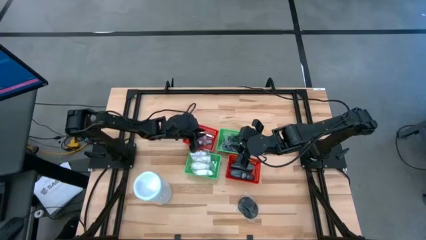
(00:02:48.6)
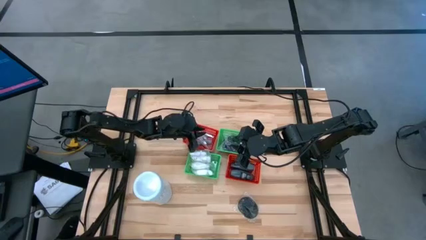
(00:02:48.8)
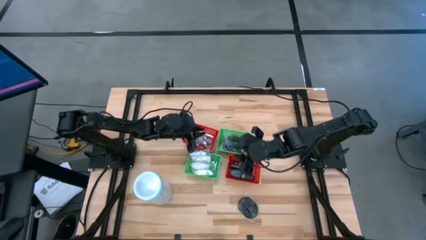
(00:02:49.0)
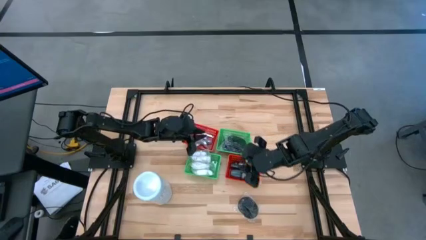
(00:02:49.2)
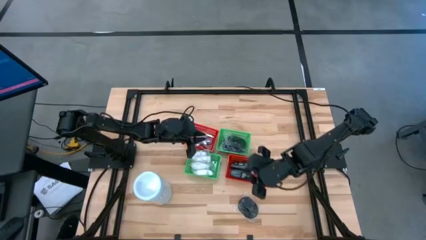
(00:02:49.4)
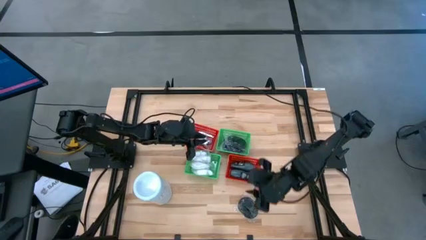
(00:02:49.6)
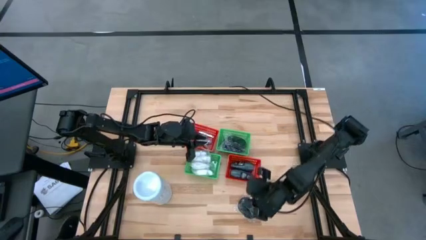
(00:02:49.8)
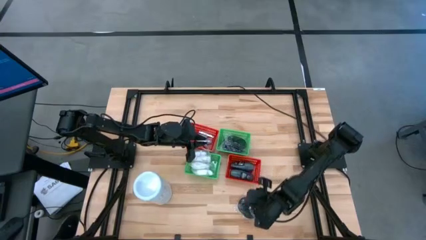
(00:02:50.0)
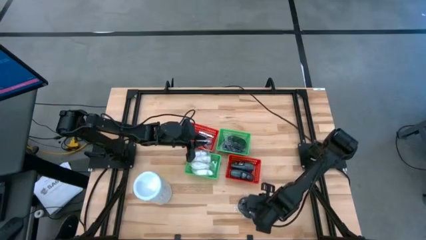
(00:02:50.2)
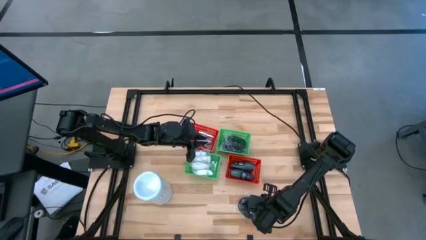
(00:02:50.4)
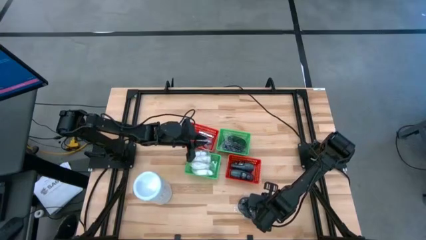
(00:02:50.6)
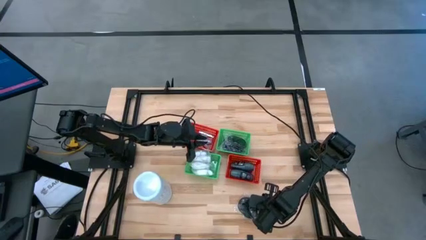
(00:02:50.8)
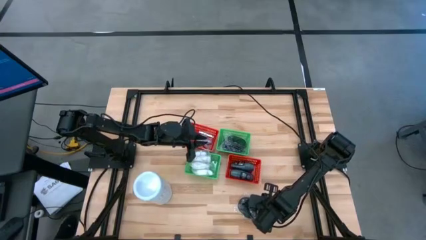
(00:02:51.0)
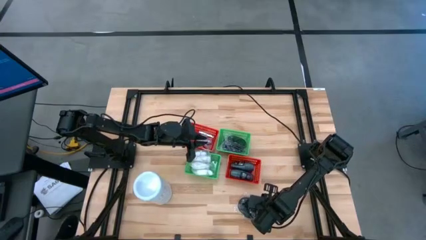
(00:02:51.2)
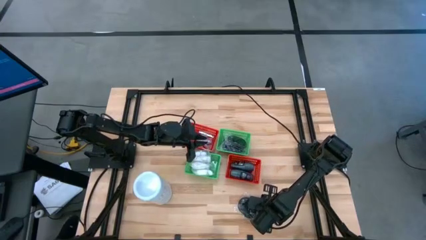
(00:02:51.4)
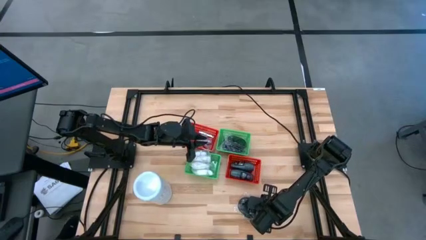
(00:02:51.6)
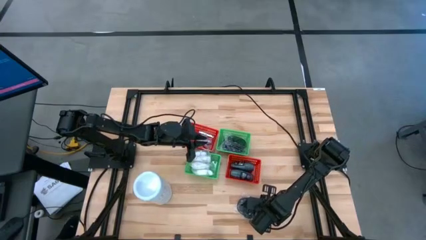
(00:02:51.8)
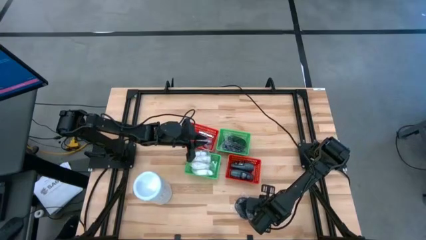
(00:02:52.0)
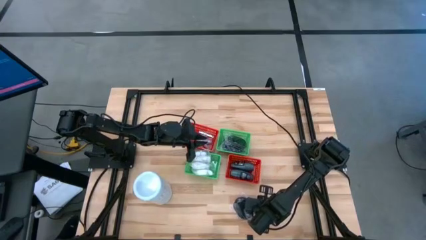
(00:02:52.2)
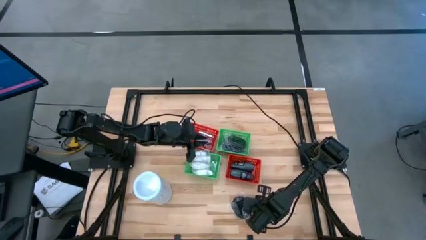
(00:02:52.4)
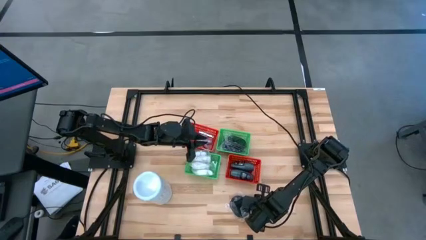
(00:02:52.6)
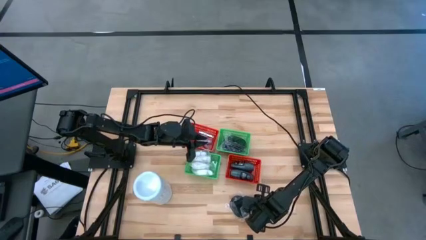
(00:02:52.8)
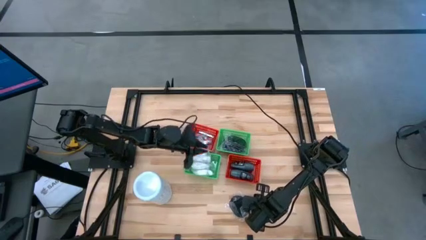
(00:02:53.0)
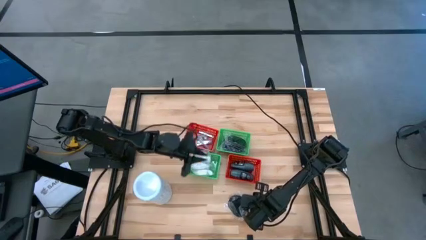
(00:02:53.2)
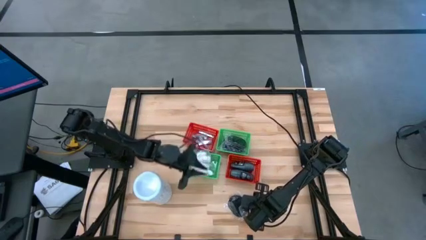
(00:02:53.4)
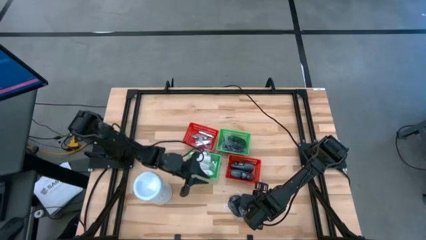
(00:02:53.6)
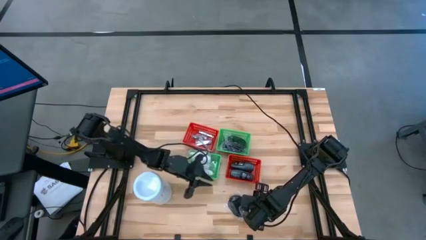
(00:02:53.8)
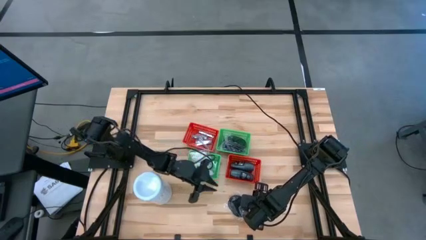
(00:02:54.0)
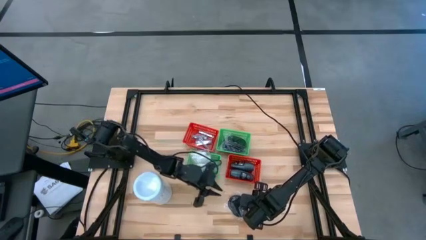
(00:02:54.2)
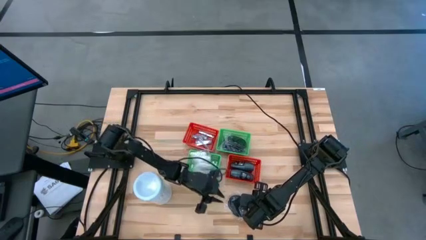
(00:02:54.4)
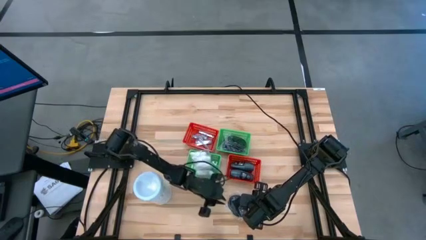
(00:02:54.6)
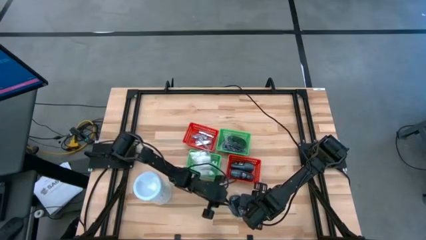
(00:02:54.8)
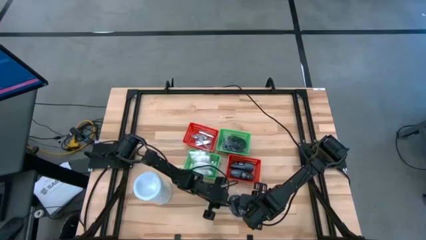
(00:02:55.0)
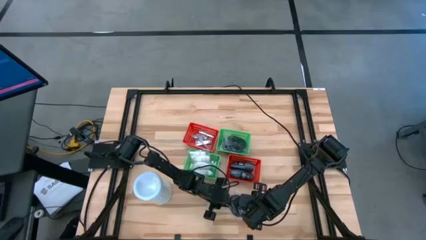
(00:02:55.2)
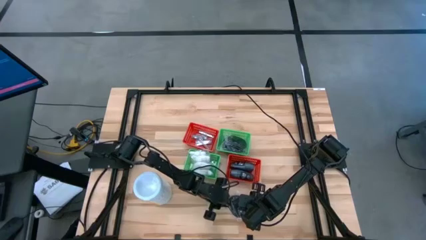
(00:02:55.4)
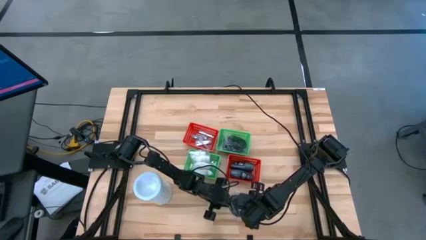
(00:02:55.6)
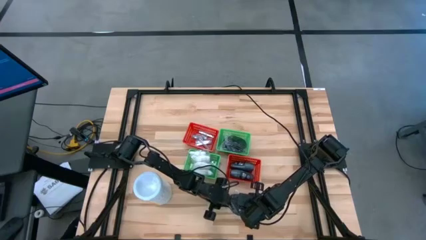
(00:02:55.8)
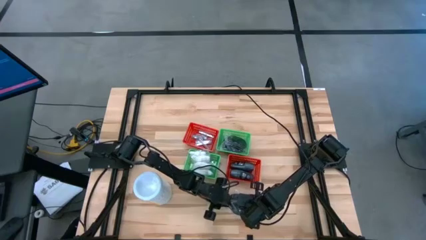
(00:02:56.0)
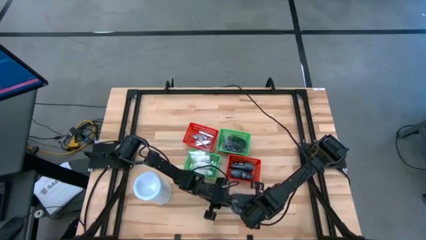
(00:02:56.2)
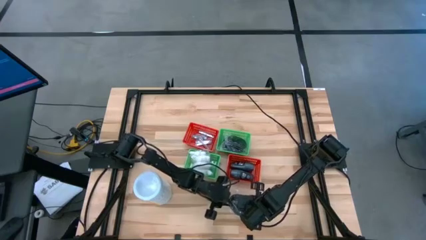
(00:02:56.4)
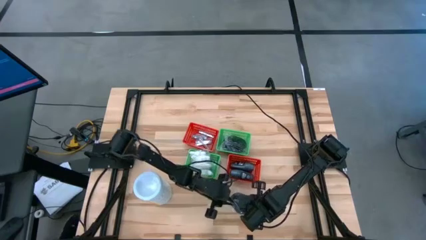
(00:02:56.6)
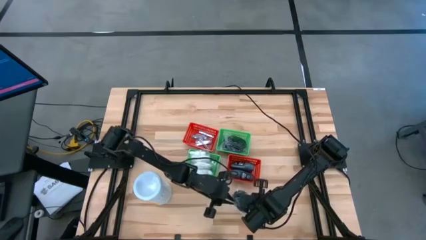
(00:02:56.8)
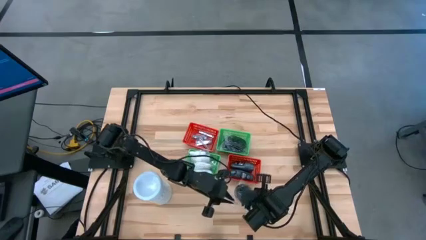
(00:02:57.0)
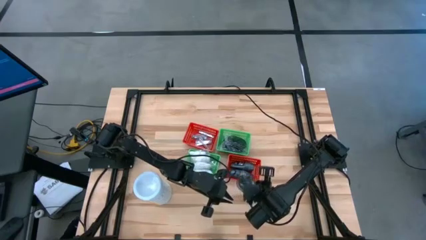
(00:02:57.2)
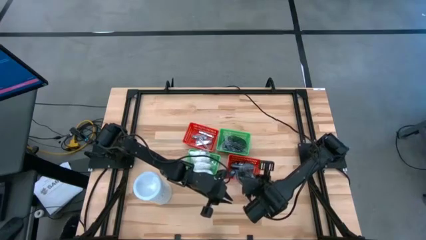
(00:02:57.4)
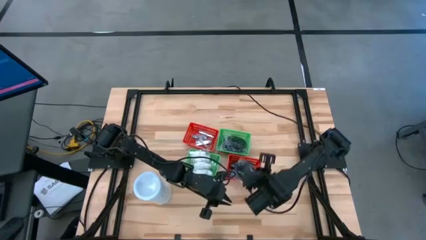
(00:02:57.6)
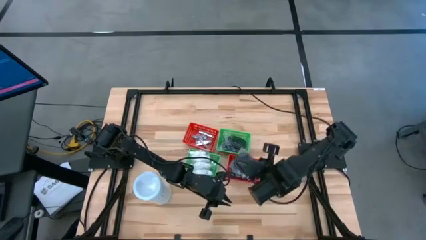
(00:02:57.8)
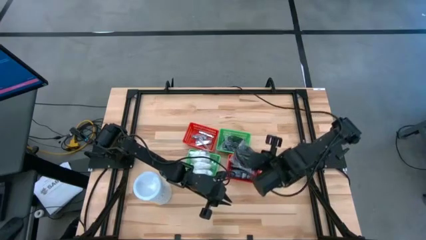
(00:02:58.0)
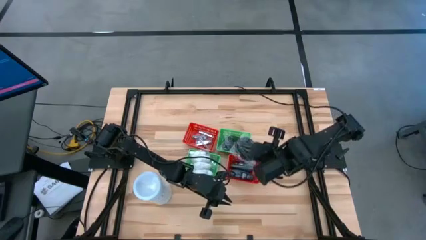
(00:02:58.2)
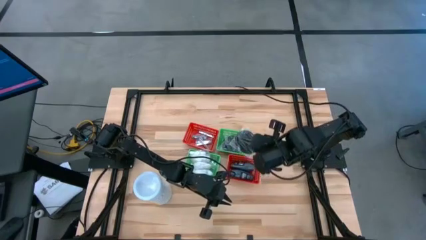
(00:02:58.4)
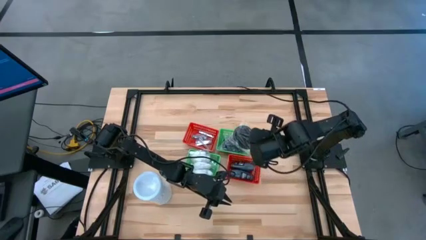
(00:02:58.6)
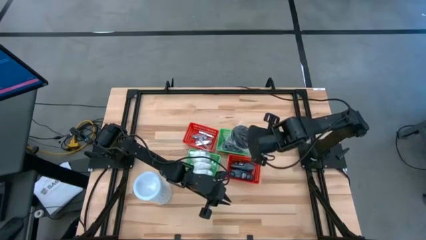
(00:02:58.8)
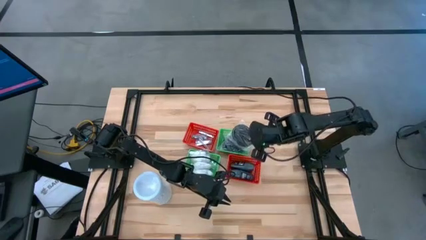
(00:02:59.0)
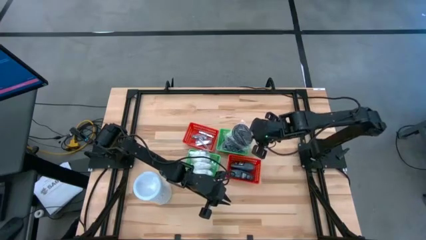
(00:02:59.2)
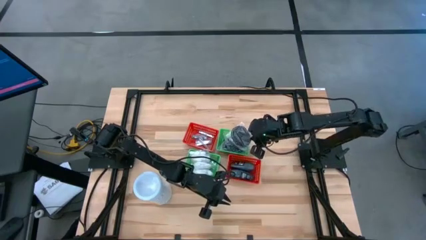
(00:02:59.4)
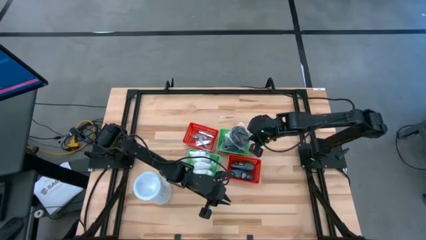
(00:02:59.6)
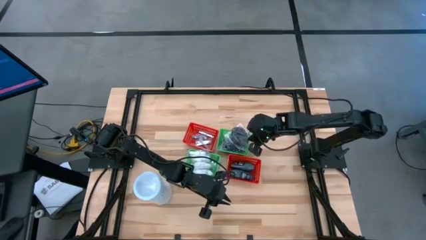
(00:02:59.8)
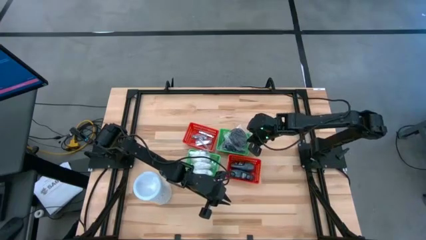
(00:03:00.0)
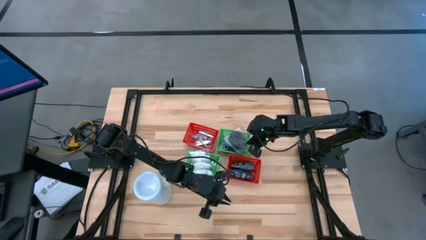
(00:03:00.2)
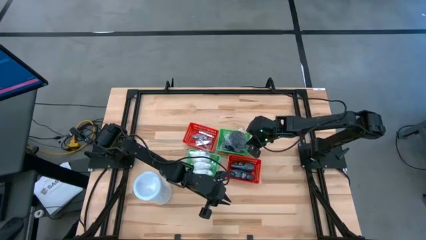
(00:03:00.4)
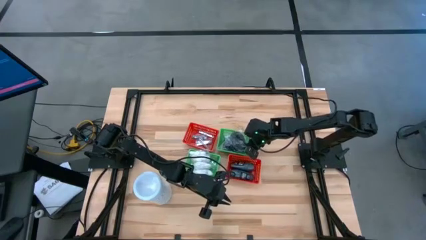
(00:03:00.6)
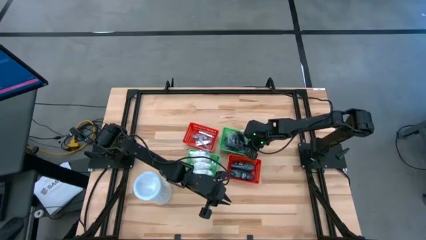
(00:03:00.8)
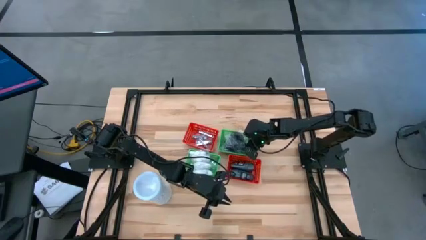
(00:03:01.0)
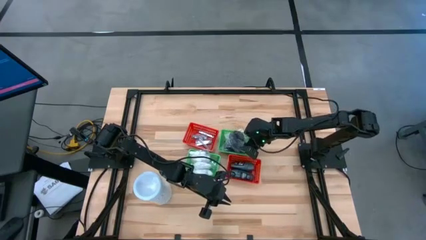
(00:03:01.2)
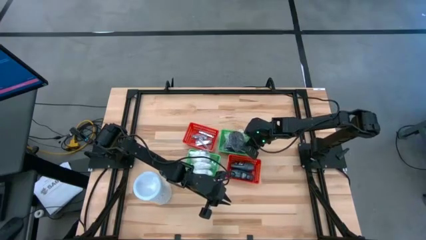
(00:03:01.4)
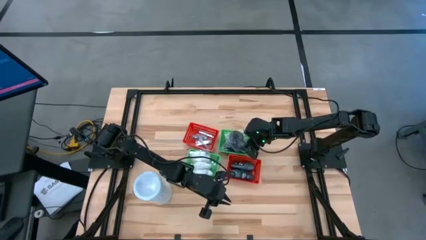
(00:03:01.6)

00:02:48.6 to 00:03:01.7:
Task: Pick & Place Travel size toiletries
Put the black hairbrush into the top right green bin

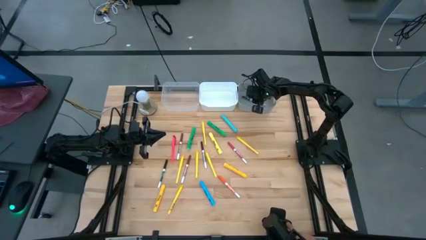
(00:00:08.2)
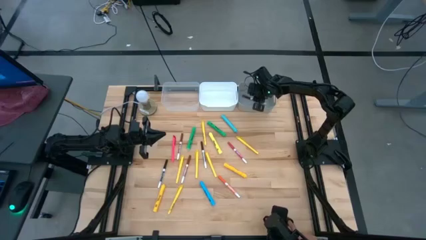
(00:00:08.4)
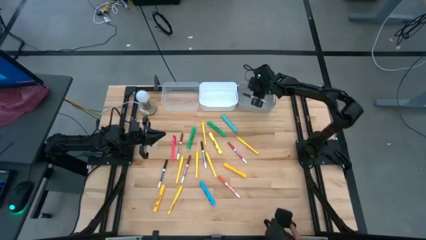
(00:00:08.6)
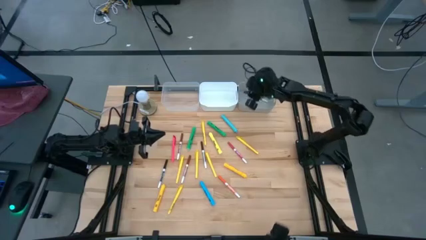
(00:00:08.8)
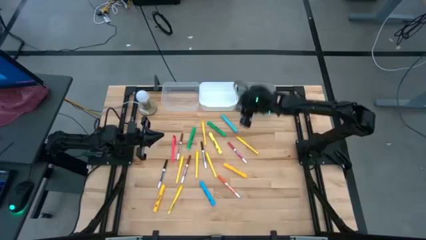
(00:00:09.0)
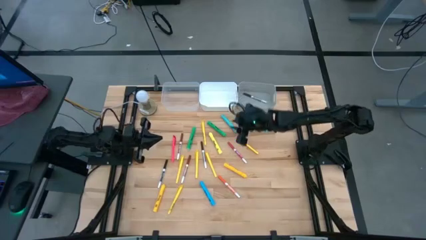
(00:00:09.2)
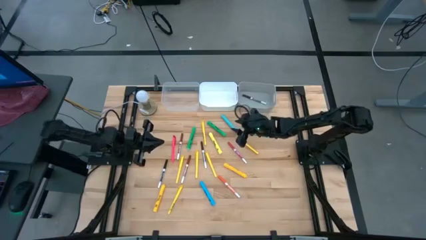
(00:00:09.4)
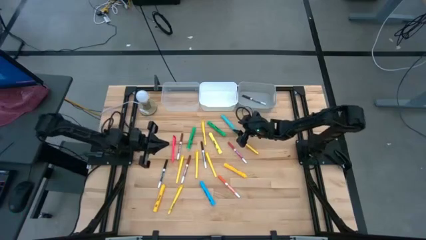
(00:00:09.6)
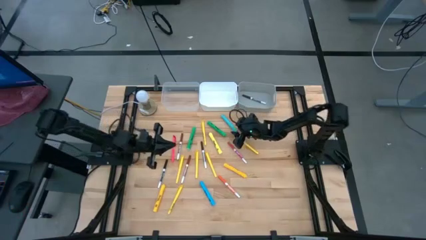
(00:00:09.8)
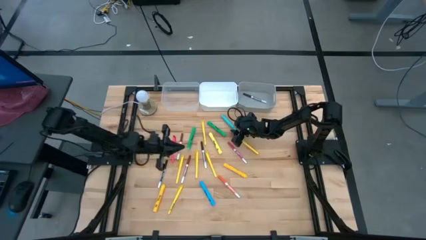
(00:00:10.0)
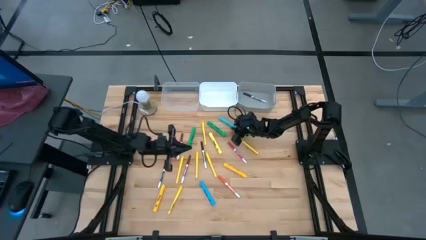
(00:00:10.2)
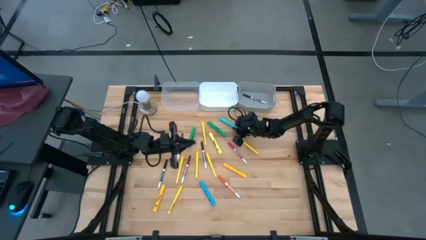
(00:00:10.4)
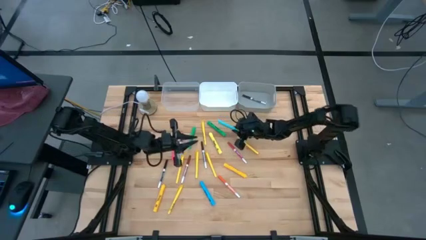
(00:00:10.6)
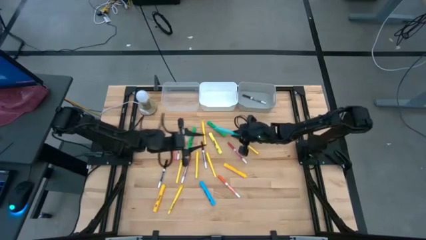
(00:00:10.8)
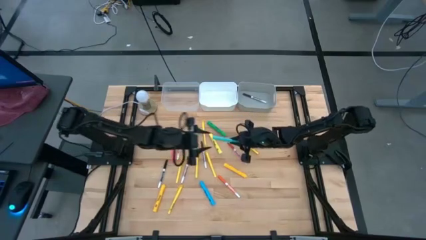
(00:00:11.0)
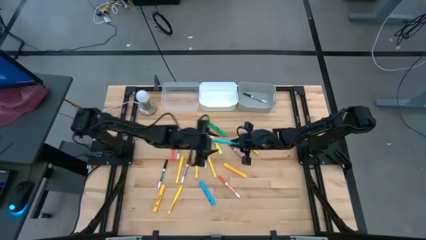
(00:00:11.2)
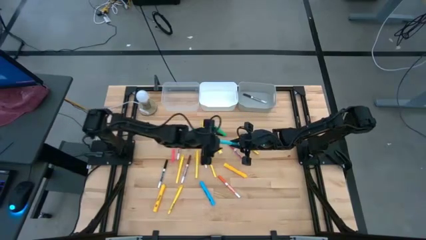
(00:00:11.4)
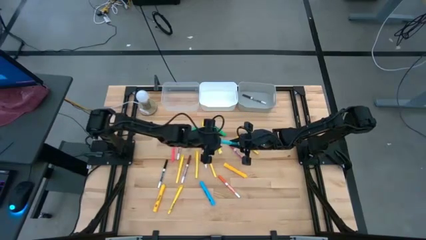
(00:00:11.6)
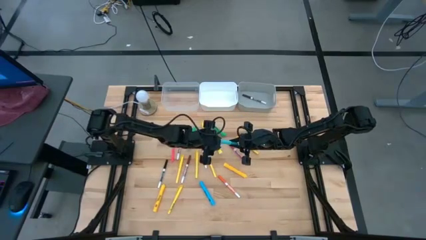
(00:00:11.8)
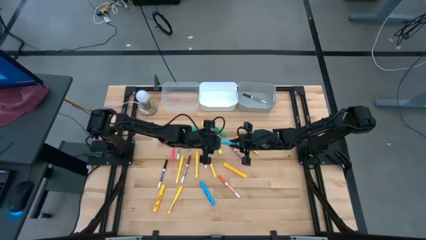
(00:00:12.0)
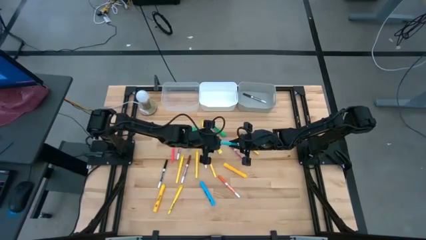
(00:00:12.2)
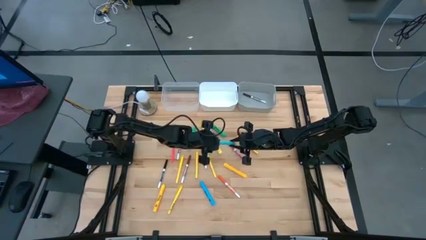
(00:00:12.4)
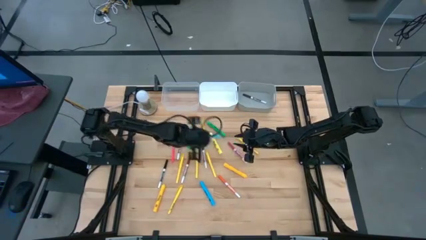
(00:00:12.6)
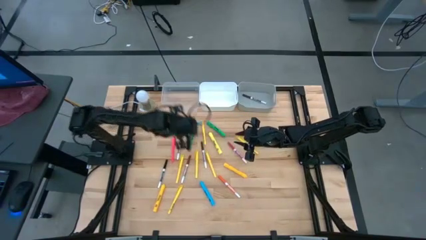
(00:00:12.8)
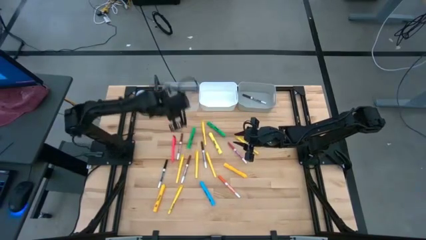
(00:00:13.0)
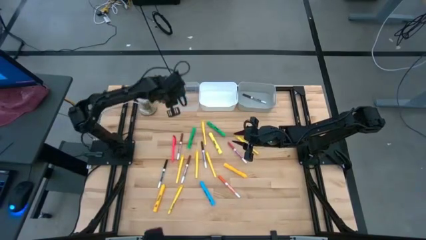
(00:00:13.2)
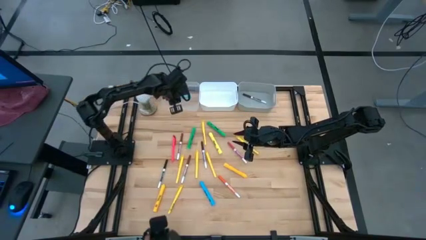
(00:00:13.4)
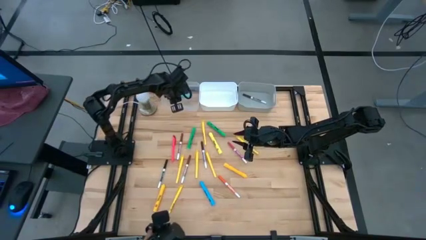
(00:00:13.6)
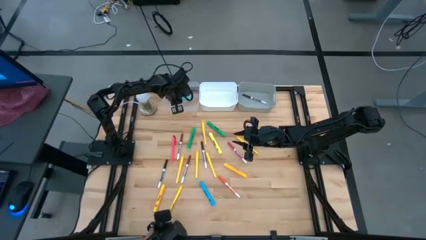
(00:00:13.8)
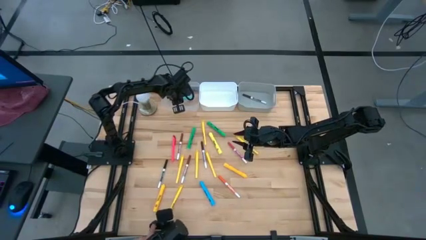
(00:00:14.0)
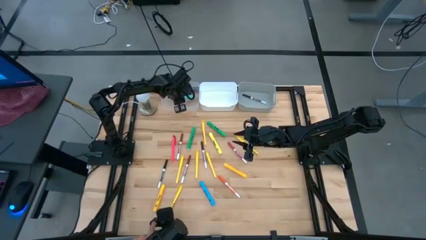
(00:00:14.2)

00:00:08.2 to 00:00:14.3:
Task: Pick & Place Markers
Put the light blue highlighter pen into the transparent bin
